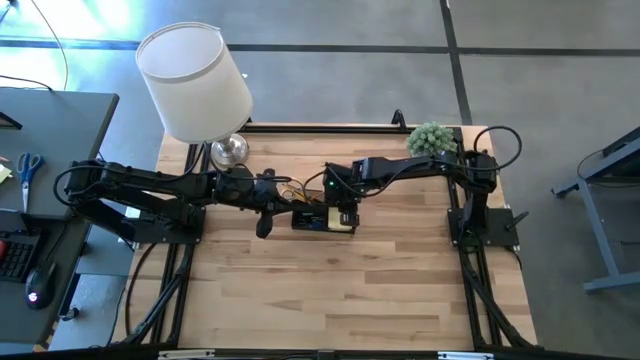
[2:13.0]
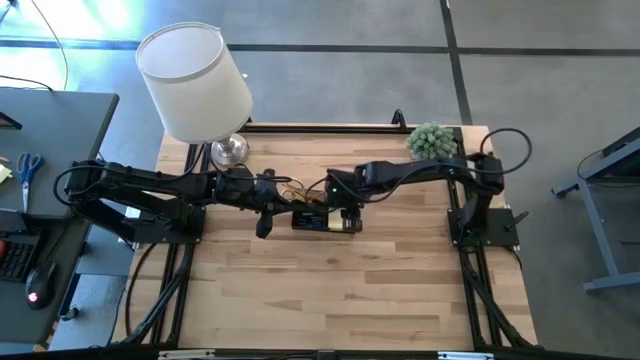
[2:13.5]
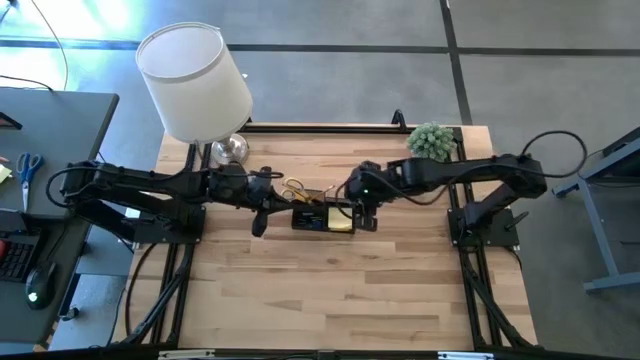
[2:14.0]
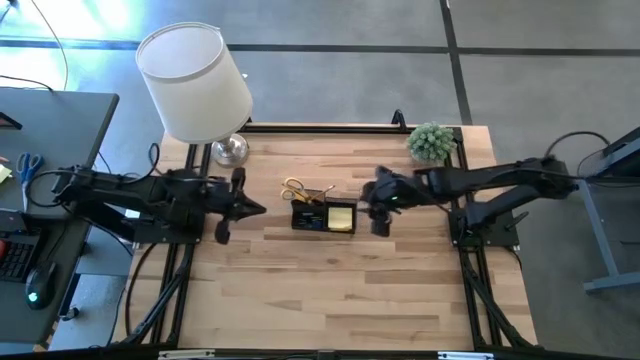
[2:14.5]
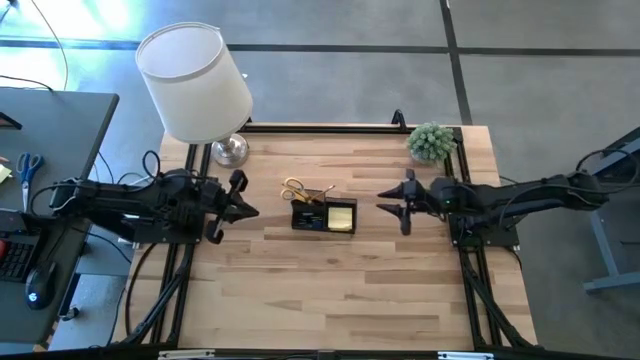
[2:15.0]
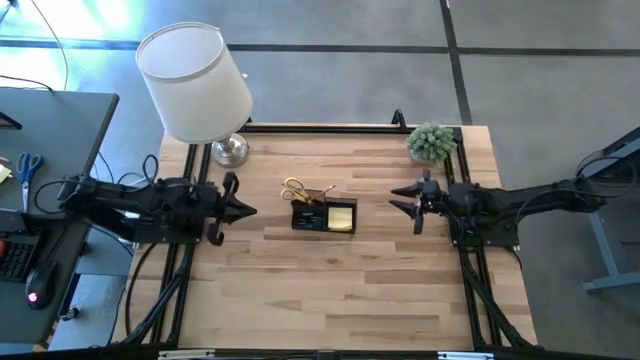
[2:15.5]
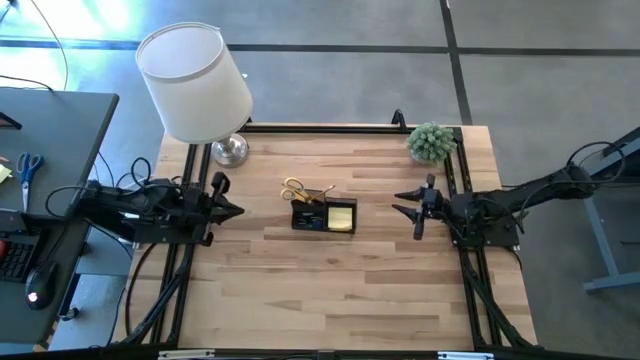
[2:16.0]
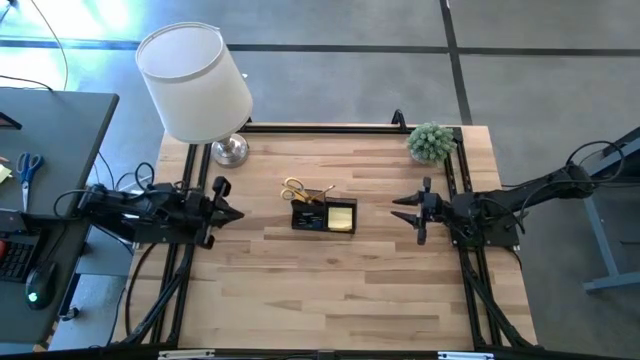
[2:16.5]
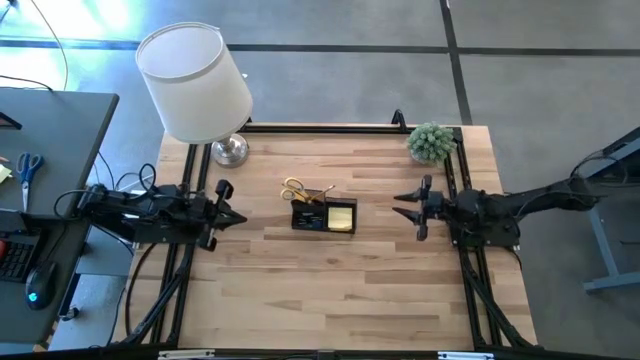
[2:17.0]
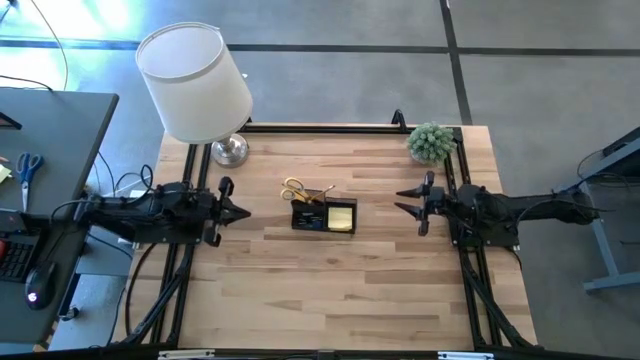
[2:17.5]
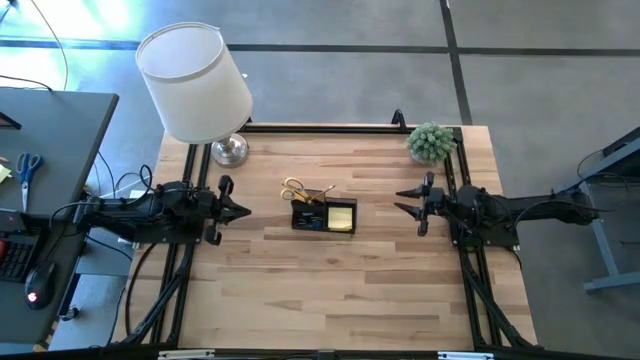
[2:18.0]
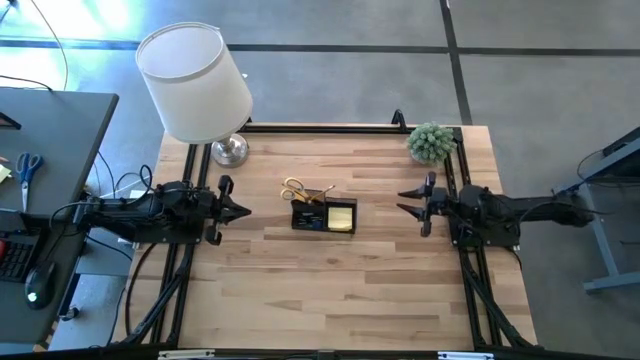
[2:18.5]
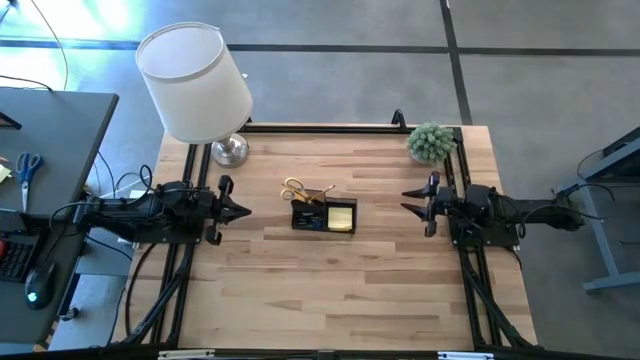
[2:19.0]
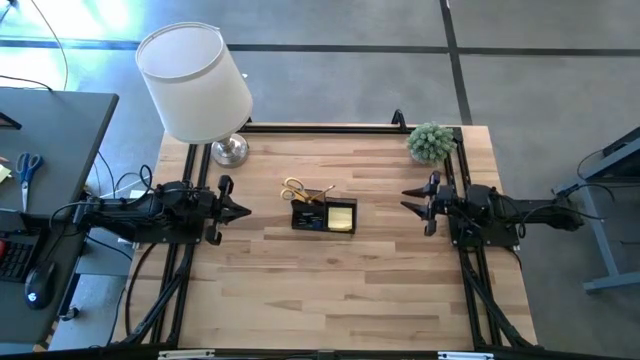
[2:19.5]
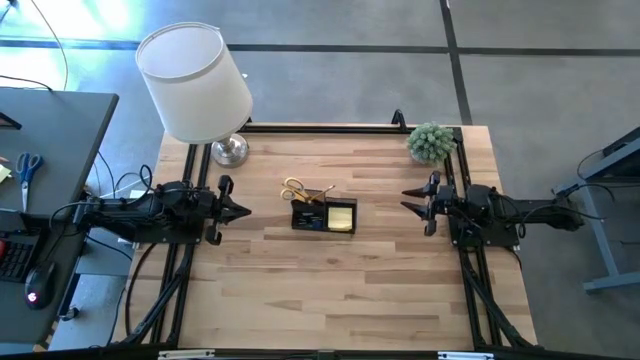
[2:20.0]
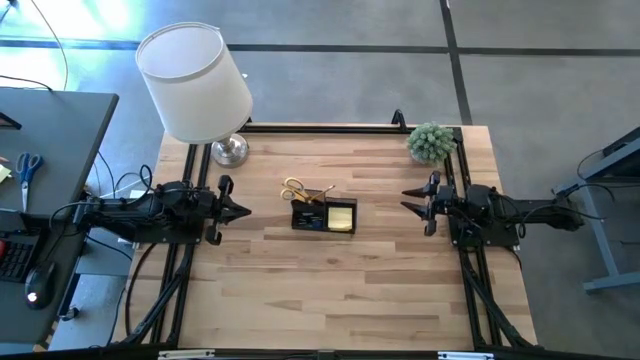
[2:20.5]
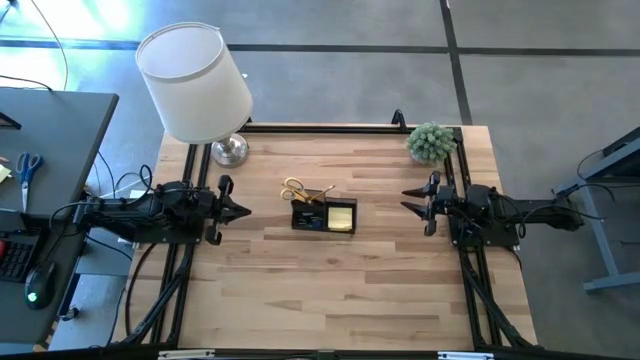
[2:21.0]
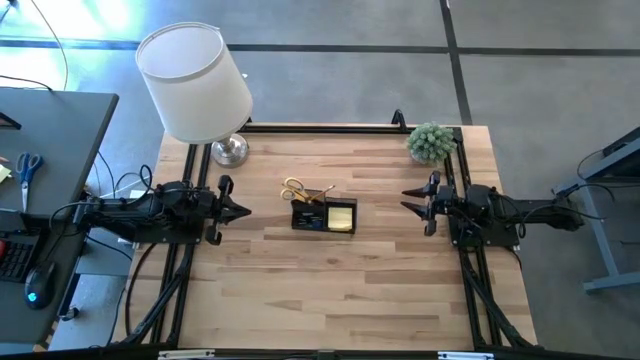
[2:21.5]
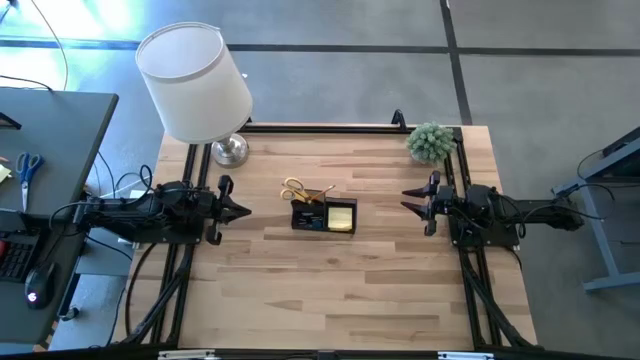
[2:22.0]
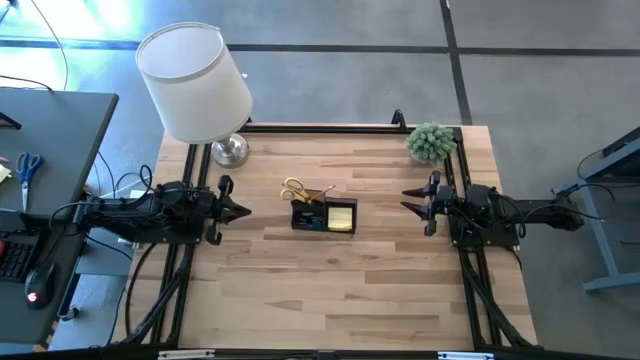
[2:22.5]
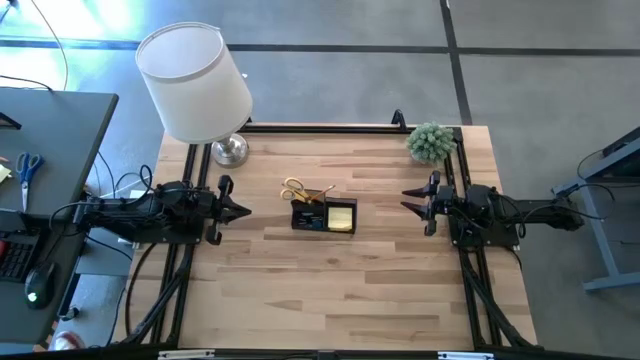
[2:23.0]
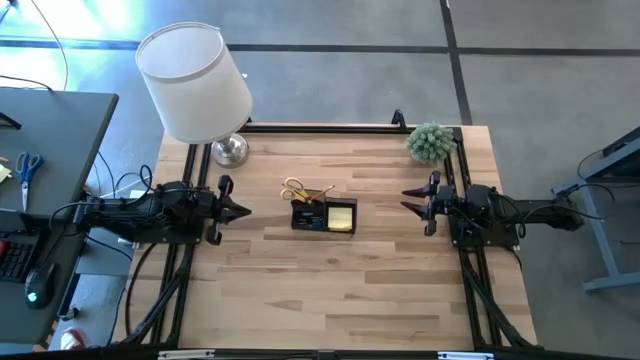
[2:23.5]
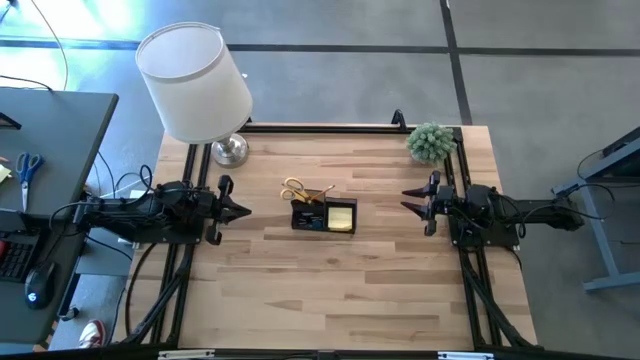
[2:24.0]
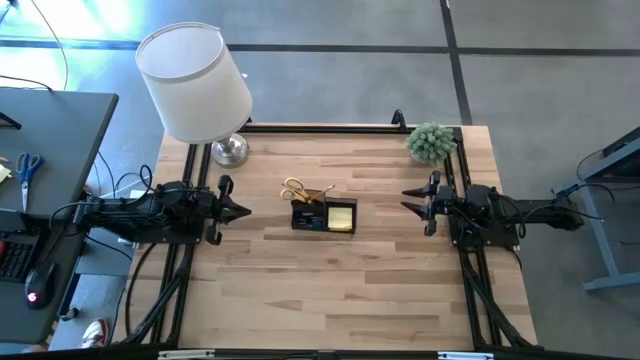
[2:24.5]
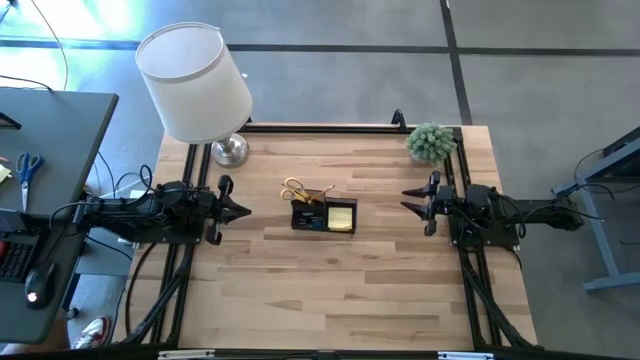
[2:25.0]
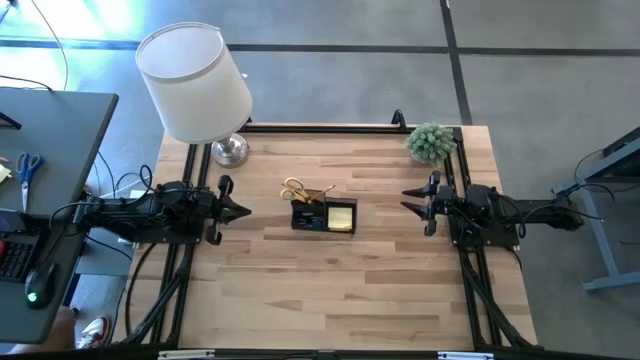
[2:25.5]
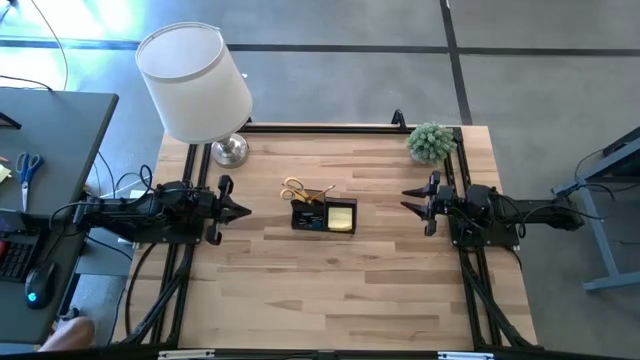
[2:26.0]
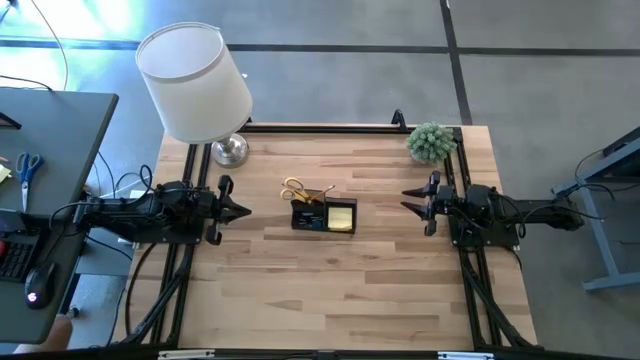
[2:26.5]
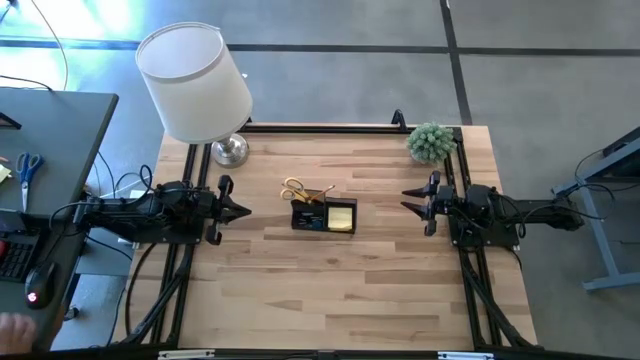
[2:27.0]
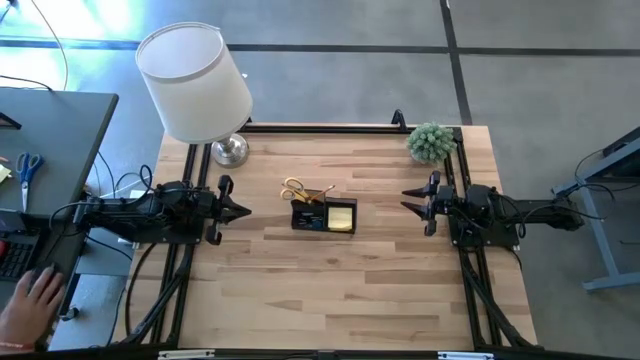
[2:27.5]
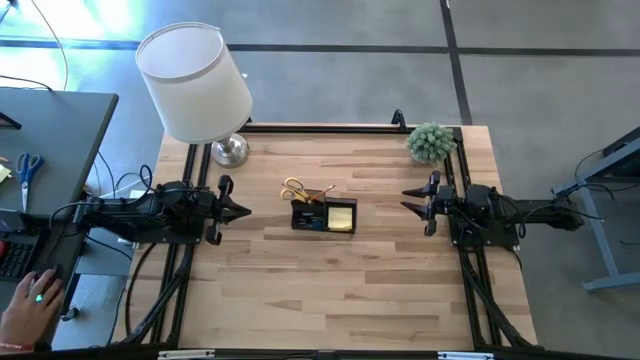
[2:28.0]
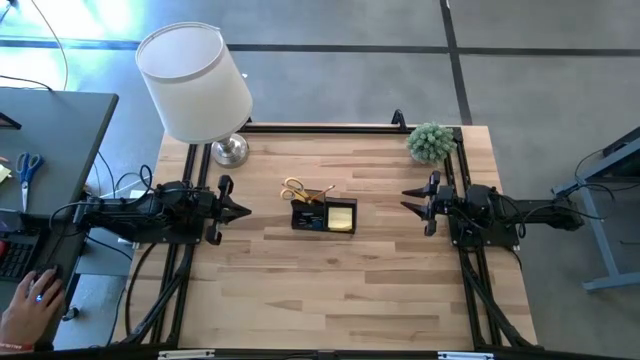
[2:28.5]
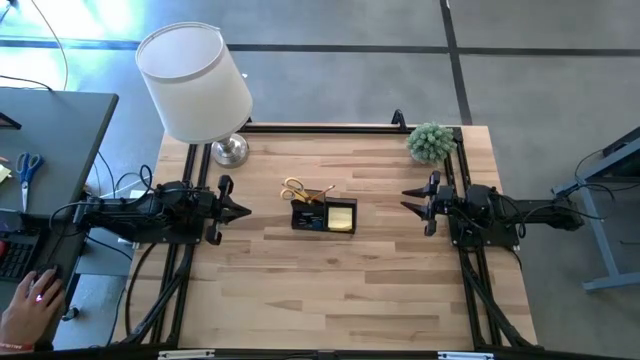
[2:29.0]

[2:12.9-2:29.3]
Task: Pick and place office supplies into organizer
Return to Home Position

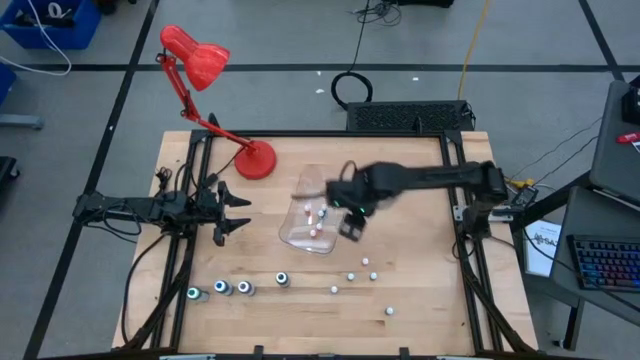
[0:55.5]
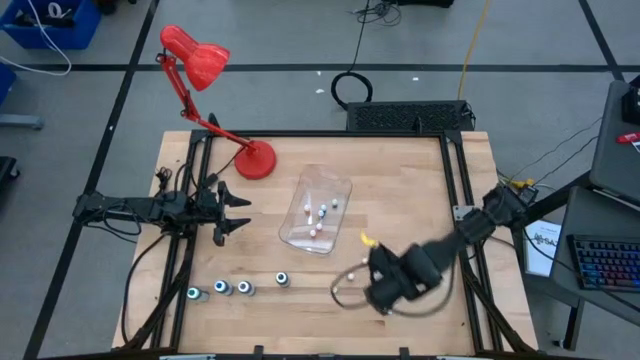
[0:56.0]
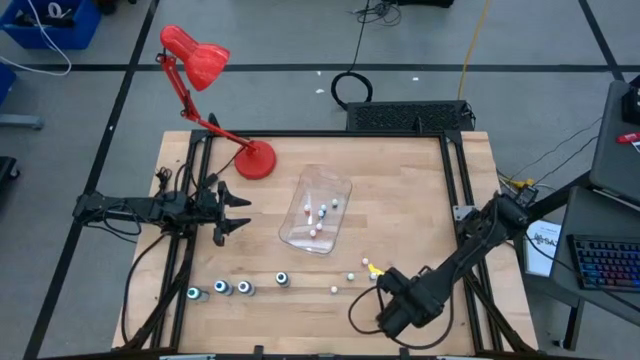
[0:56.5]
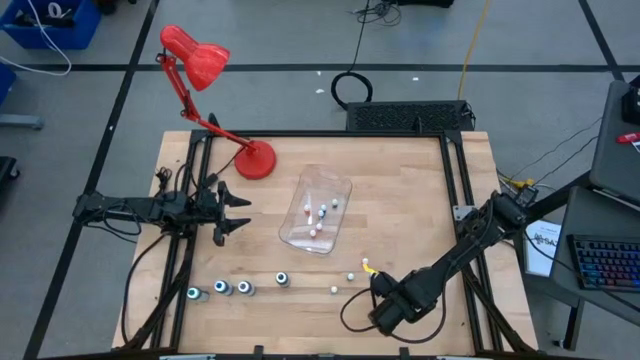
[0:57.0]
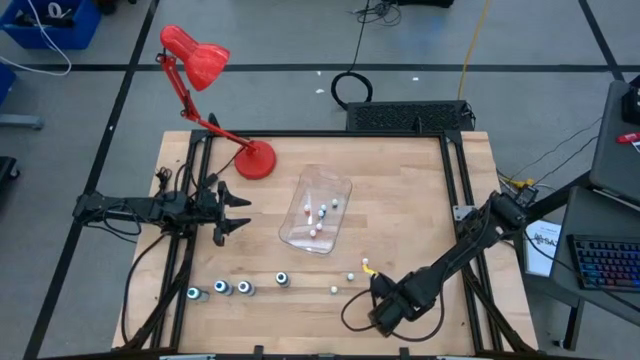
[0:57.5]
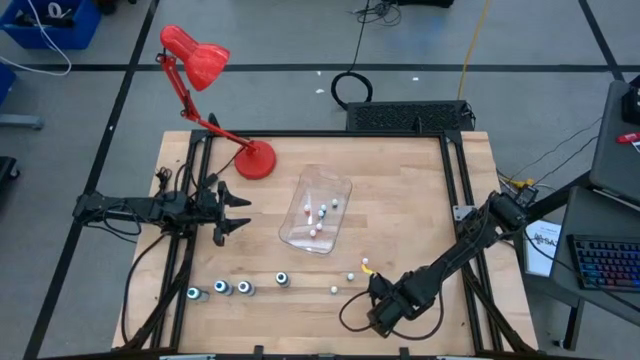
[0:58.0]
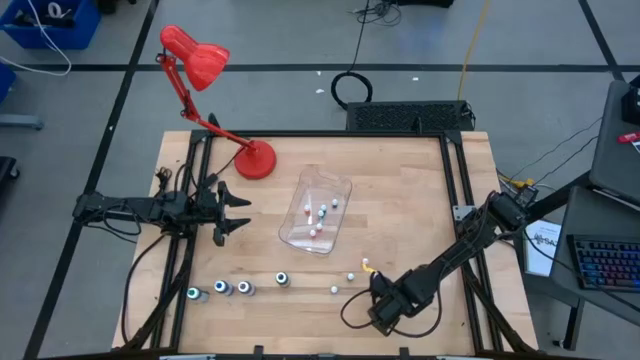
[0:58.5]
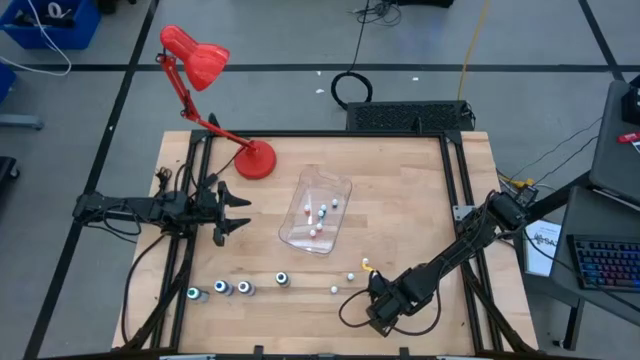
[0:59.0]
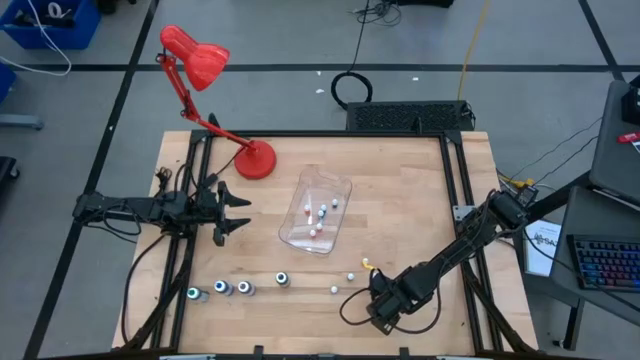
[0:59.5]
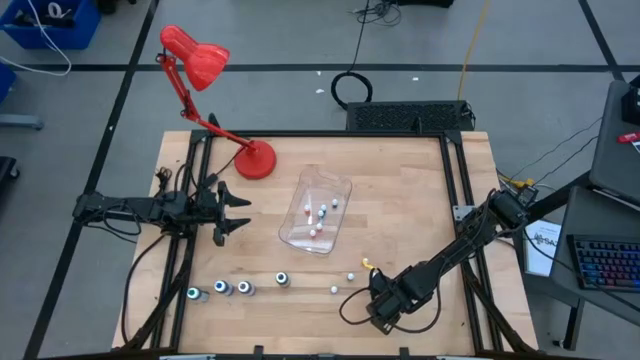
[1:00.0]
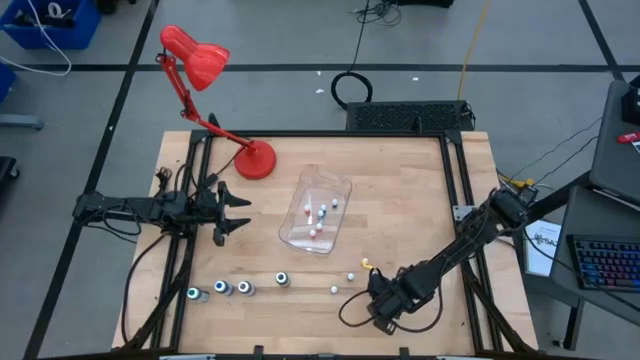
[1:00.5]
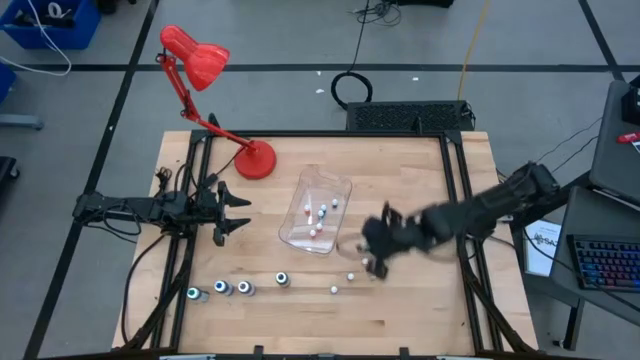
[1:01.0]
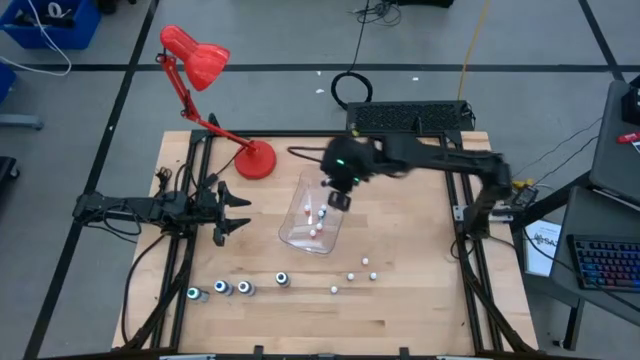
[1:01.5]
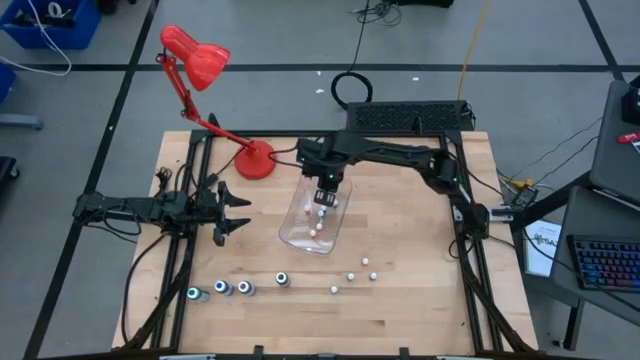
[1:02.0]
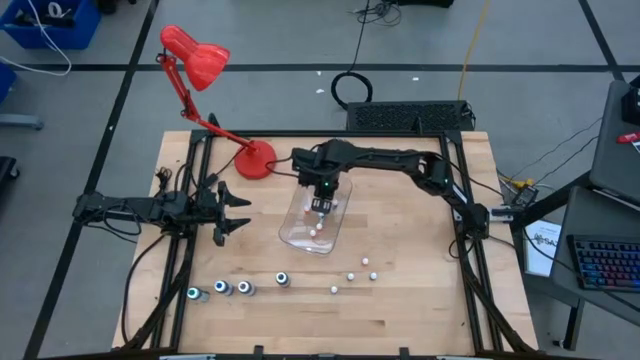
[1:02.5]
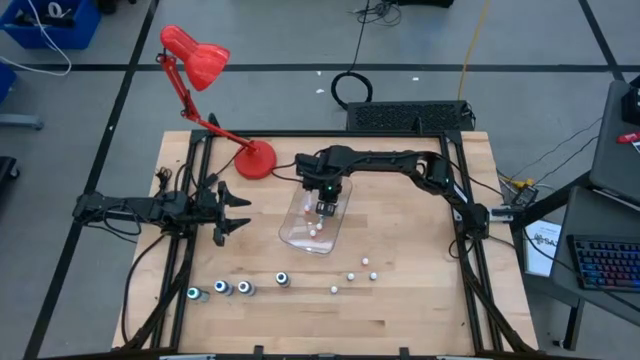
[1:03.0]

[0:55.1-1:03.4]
Task: Pick & Place food coloring
Put the small green food coloring bottle into the transparent bin
